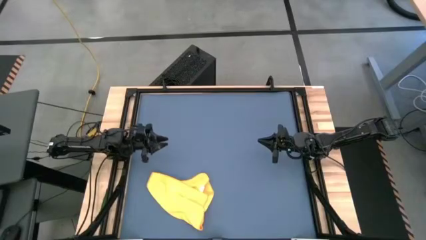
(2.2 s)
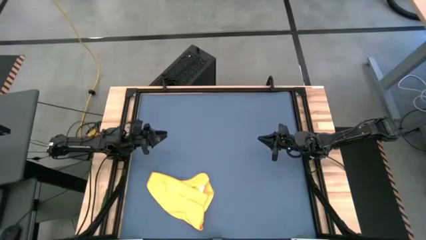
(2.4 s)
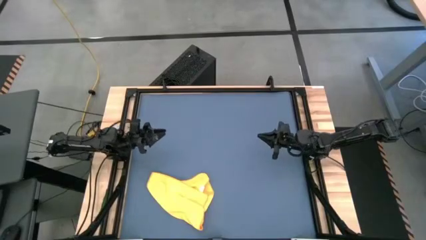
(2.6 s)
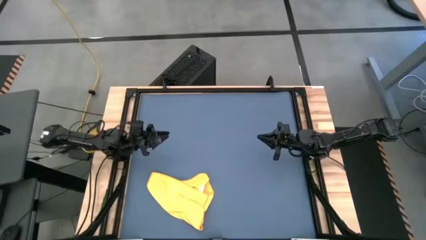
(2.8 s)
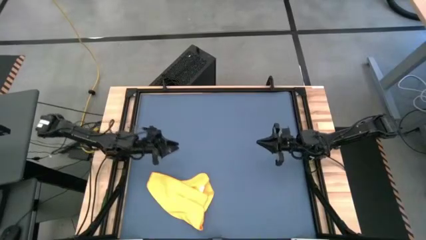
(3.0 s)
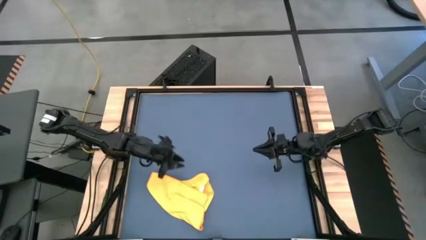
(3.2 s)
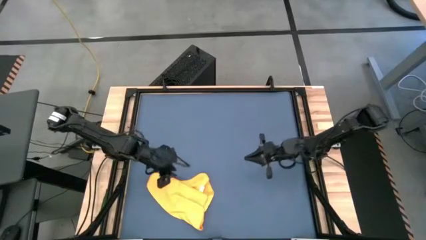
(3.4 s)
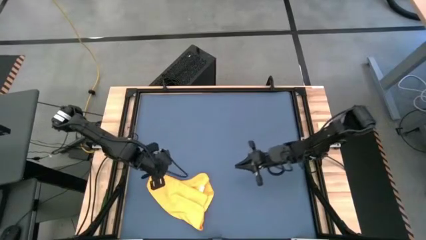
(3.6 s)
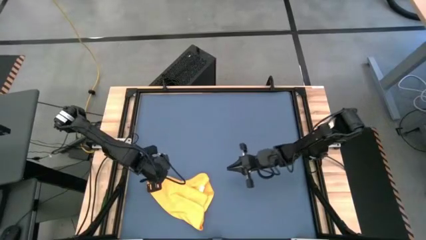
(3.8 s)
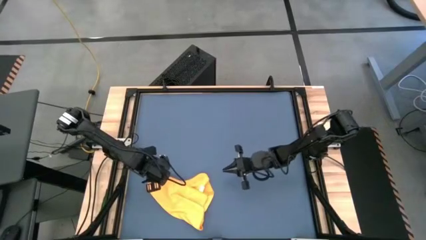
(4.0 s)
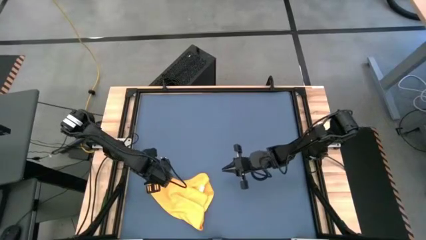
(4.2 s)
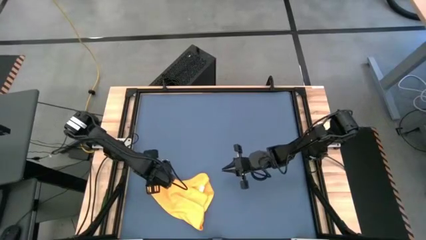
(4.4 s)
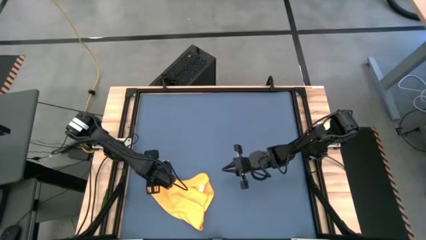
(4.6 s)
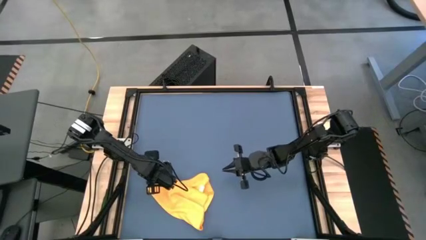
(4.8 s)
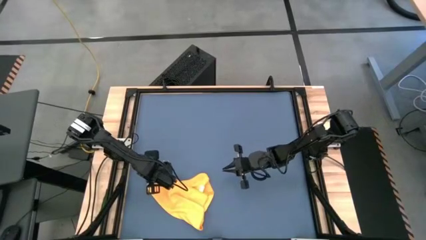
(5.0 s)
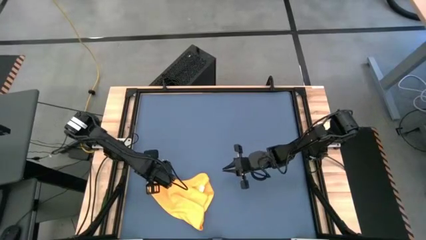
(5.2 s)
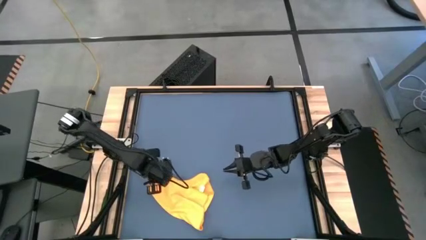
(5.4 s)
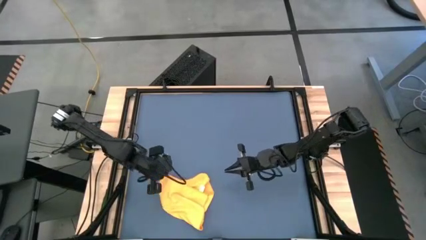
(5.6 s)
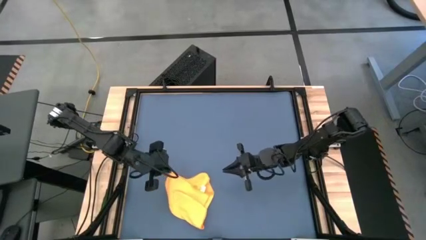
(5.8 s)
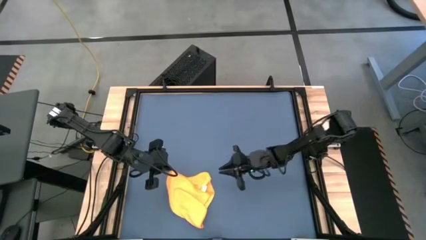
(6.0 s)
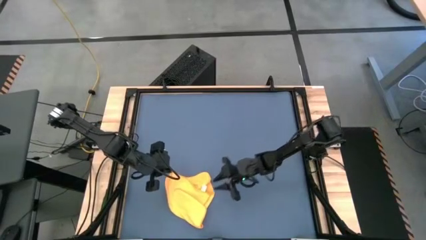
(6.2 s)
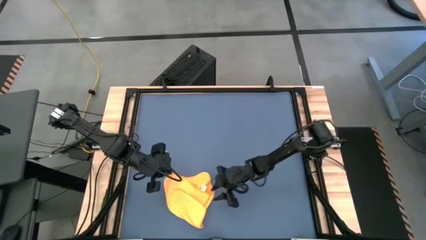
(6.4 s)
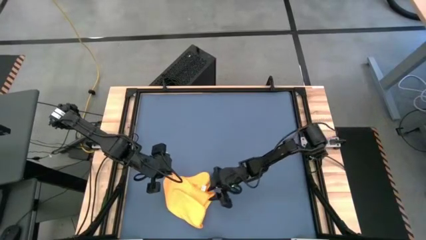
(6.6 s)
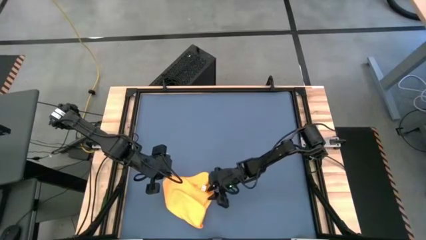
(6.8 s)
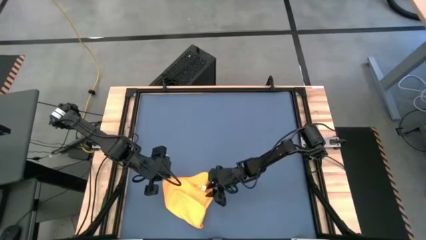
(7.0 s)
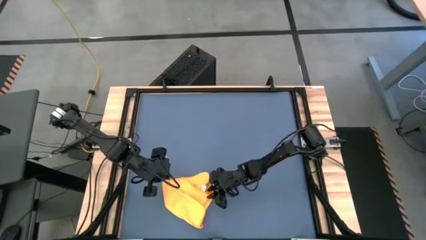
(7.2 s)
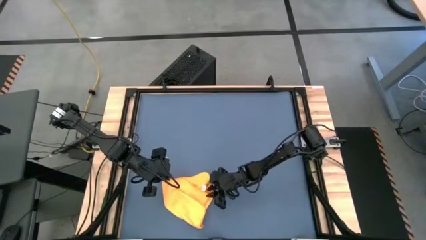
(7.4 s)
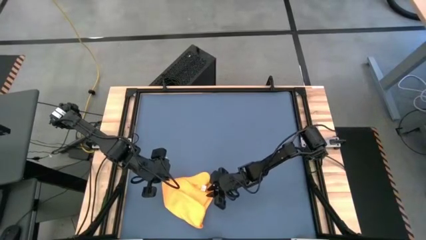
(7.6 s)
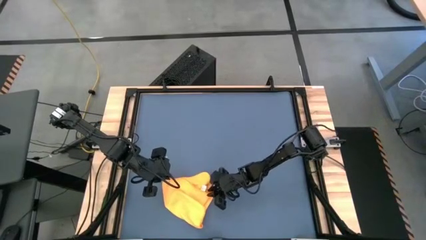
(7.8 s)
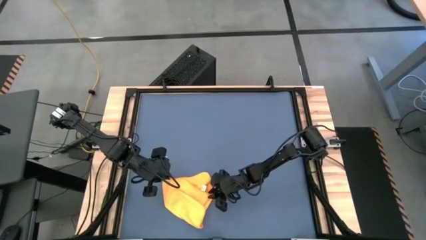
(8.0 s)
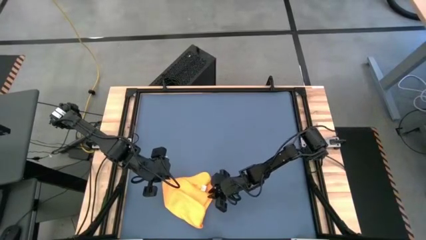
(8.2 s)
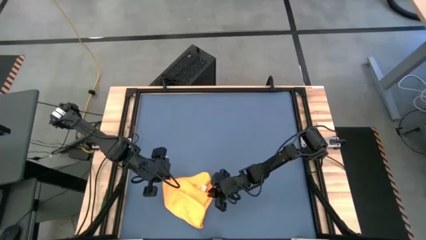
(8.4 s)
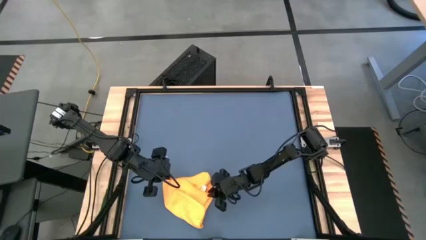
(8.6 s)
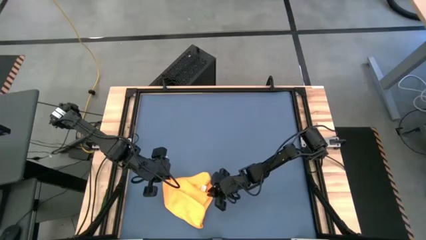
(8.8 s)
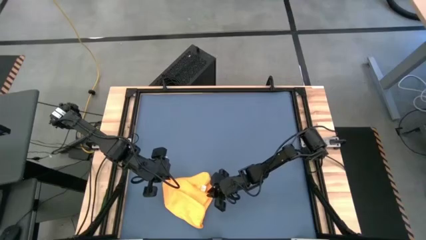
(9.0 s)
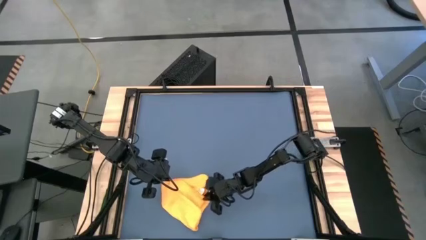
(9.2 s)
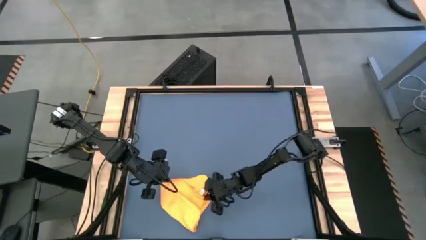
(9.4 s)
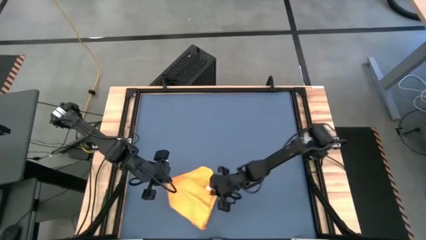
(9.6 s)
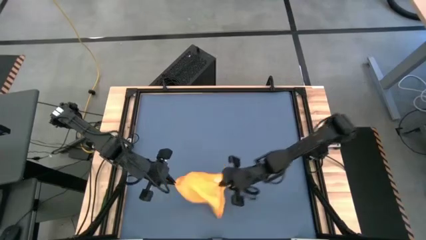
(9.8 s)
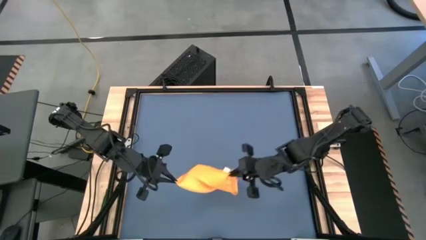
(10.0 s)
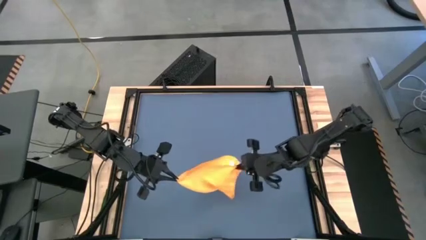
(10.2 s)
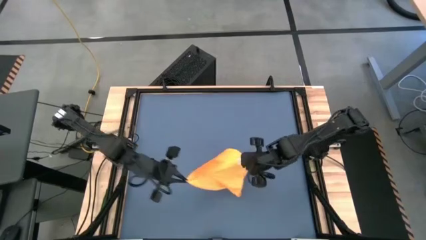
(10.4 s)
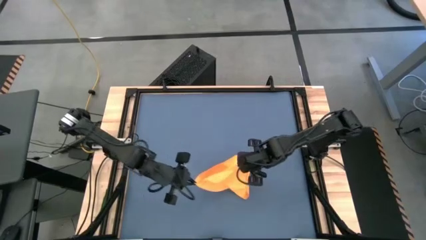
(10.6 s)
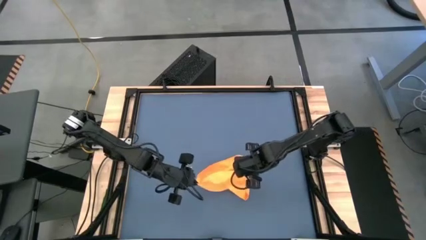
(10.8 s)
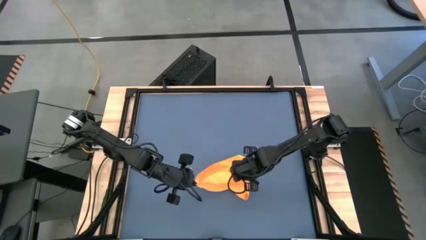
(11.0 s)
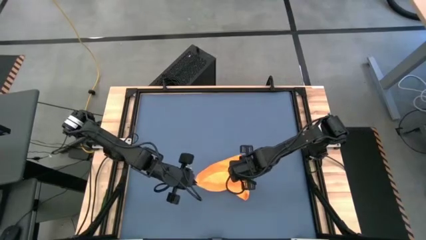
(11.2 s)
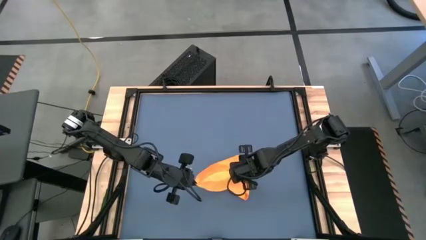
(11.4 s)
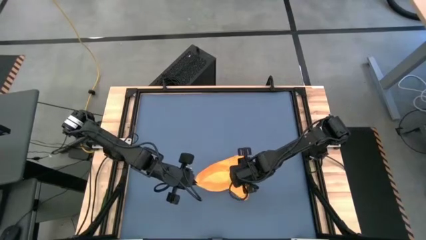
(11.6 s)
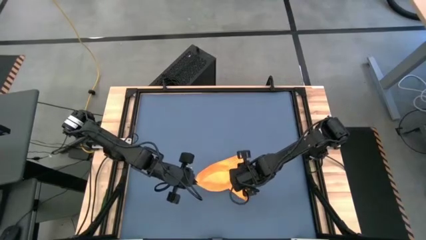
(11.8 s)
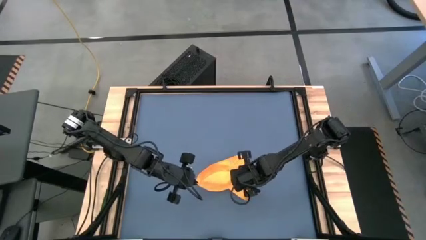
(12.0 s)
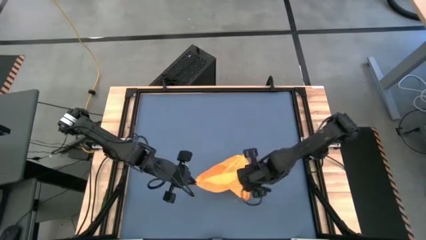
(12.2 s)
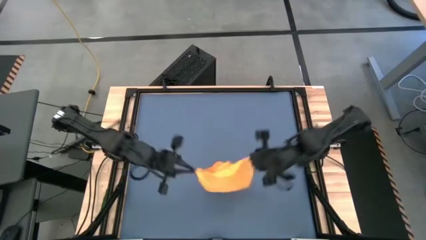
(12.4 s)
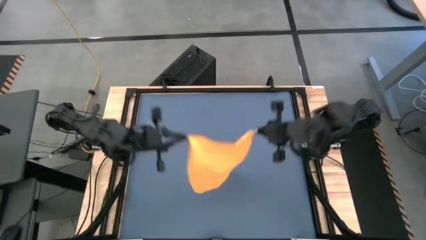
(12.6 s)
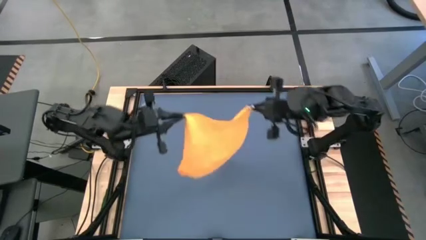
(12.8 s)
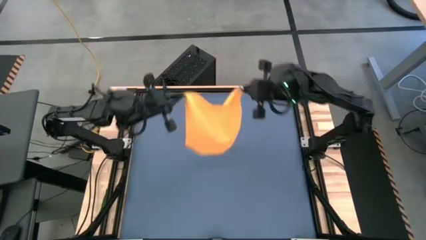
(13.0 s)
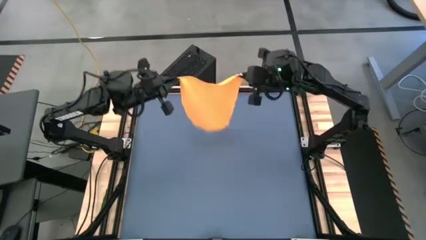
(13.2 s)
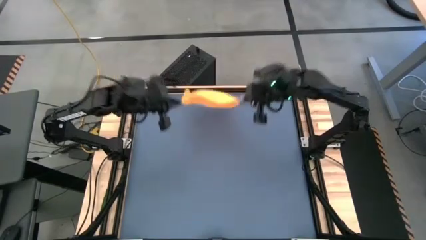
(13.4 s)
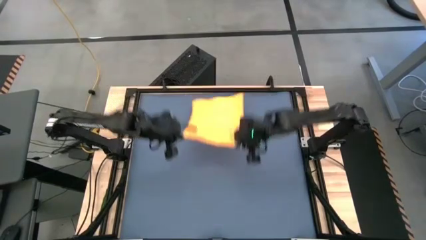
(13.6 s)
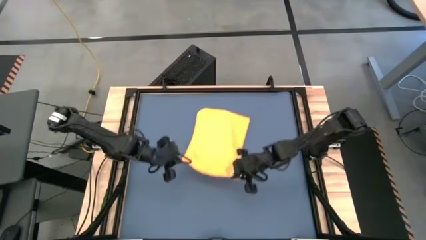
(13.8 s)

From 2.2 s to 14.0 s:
Task: Roll towel
Fold the orange microfiber cloth

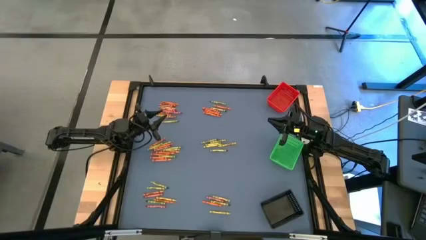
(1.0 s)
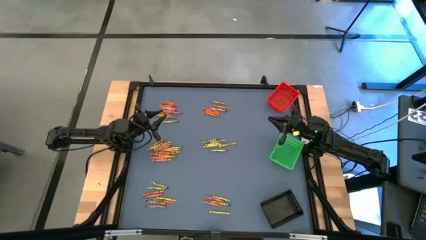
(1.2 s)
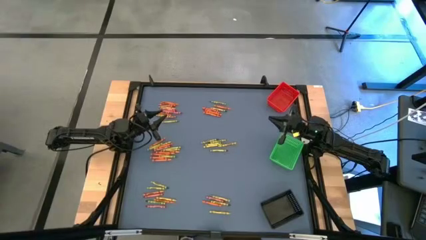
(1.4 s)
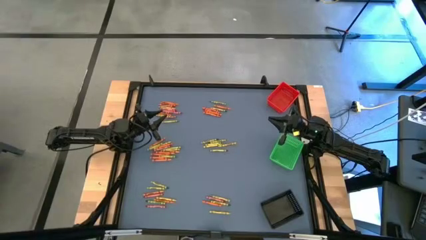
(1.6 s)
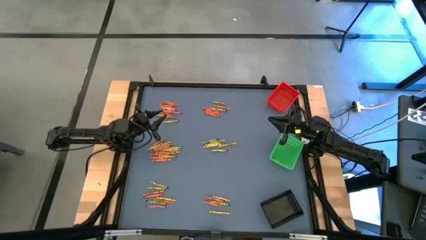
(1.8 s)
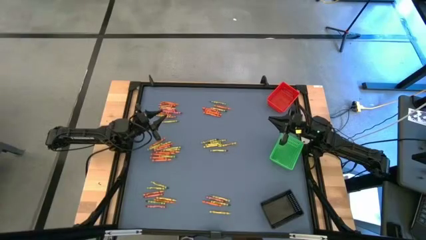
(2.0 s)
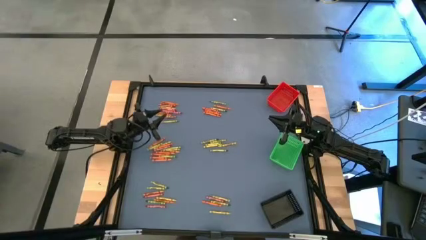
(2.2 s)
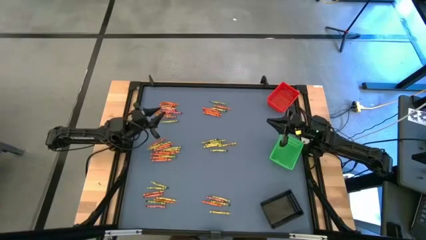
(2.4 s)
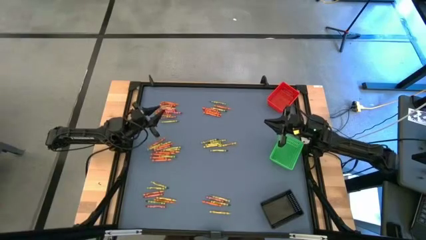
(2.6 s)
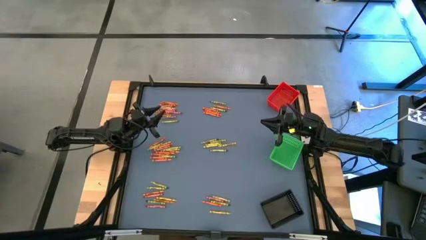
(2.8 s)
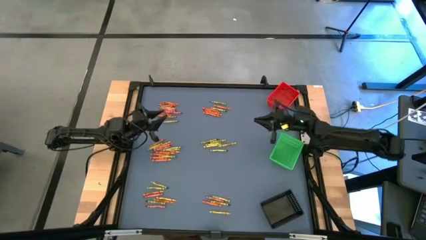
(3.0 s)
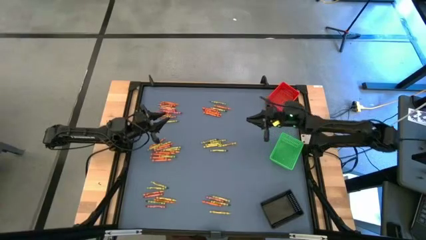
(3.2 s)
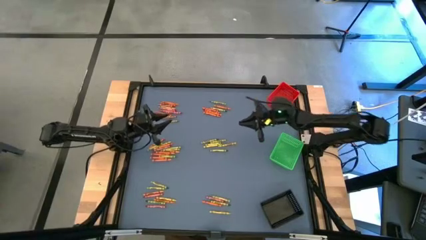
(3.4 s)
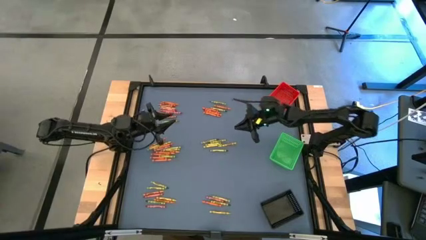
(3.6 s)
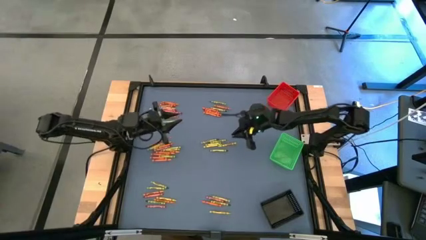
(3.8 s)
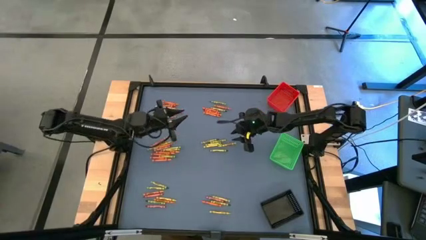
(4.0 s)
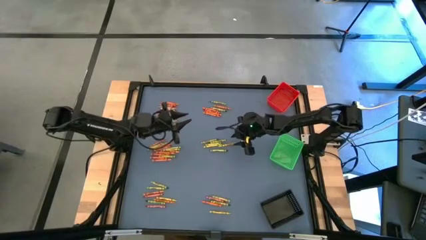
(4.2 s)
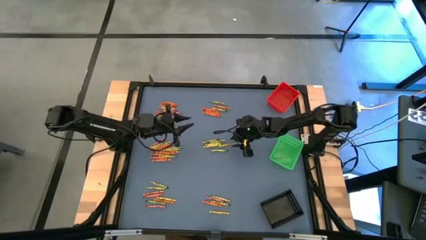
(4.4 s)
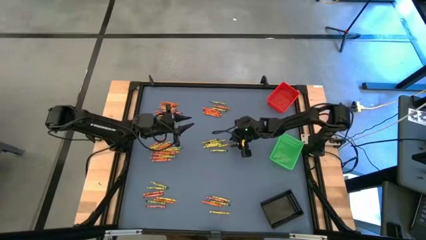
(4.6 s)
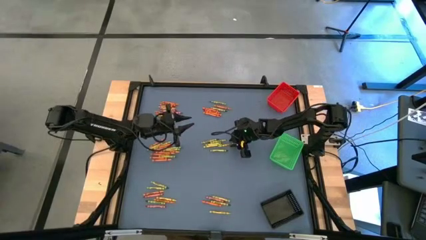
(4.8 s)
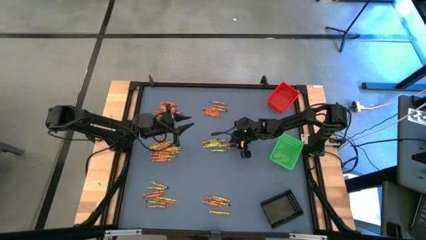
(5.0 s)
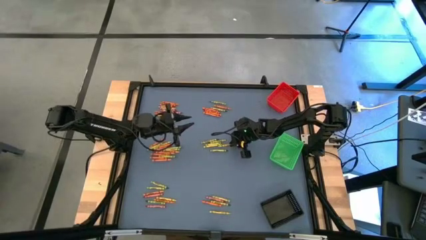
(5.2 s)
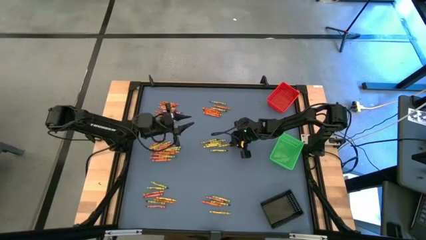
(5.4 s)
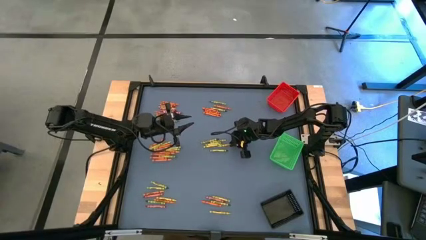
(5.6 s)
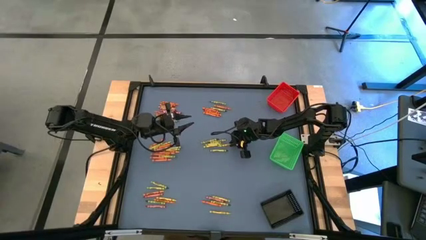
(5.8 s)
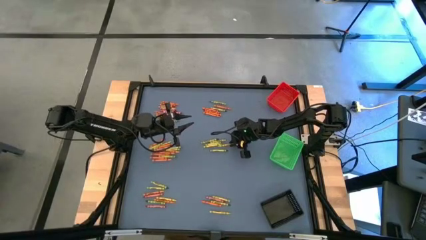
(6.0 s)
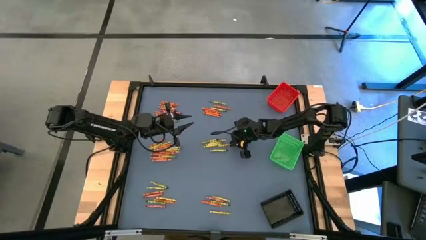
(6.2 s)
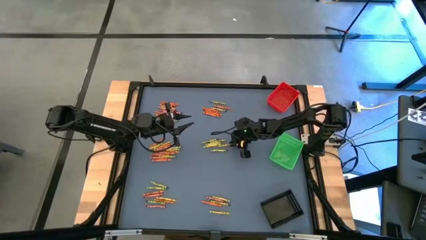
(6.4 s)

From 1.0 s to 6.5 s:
Task: Sort crayons
Put the light green crayon into the red bin
